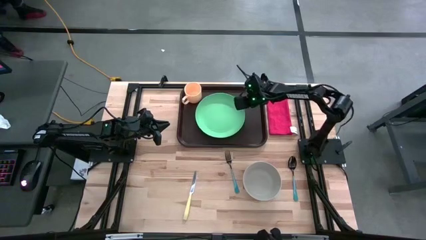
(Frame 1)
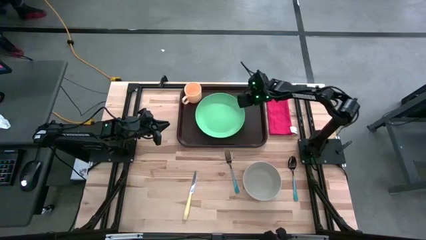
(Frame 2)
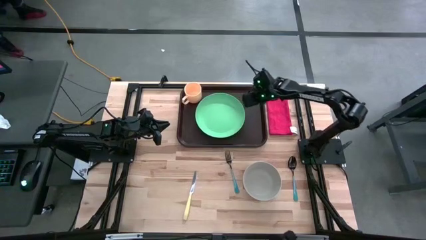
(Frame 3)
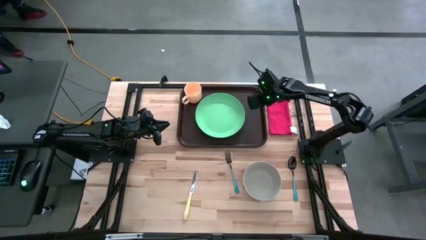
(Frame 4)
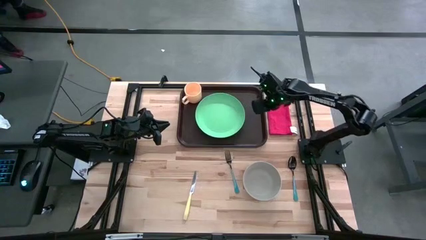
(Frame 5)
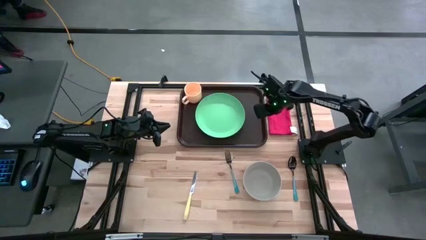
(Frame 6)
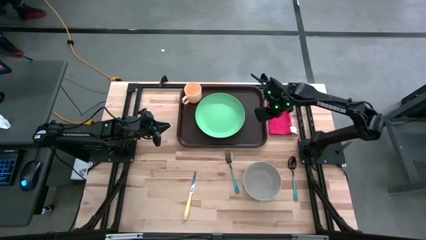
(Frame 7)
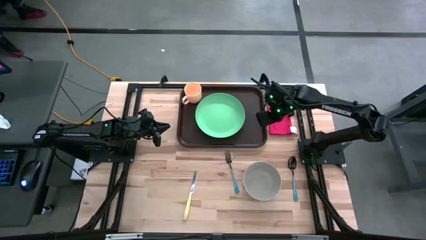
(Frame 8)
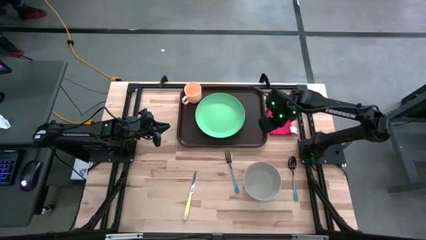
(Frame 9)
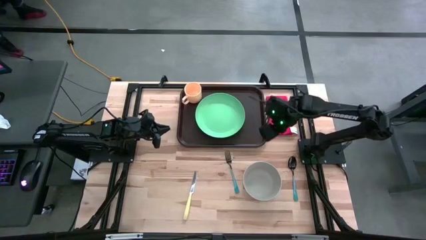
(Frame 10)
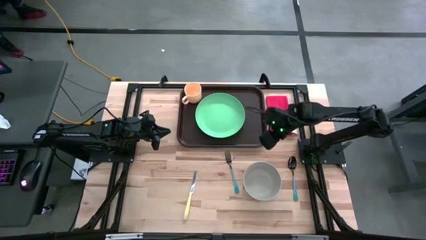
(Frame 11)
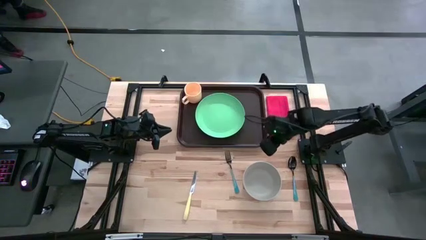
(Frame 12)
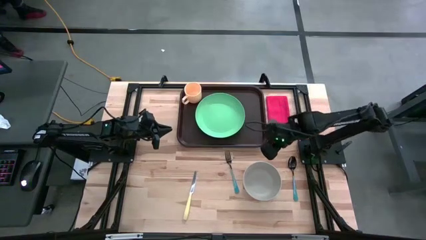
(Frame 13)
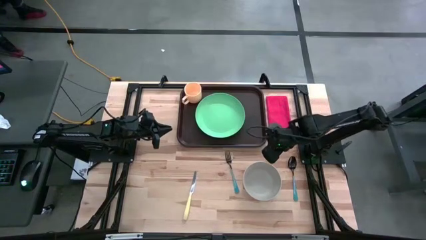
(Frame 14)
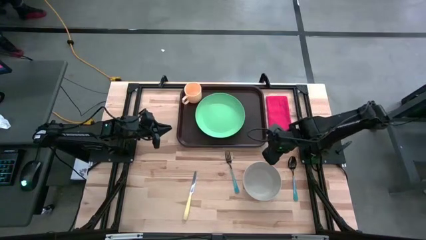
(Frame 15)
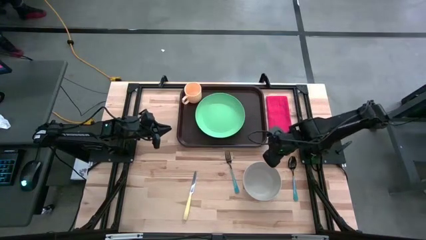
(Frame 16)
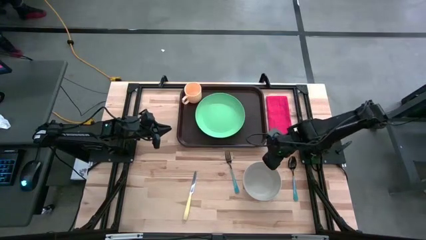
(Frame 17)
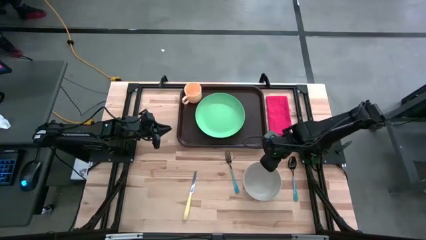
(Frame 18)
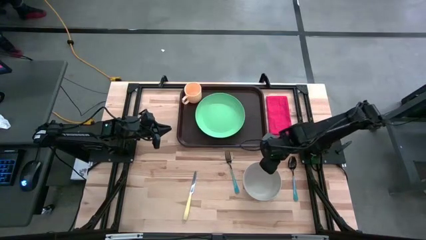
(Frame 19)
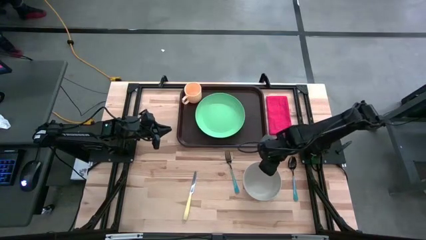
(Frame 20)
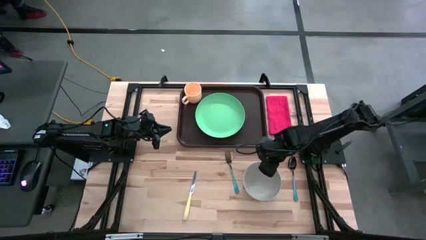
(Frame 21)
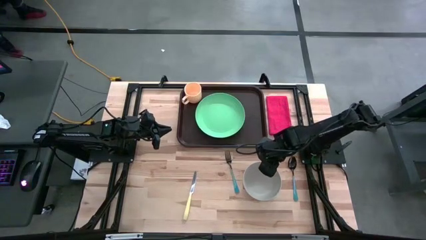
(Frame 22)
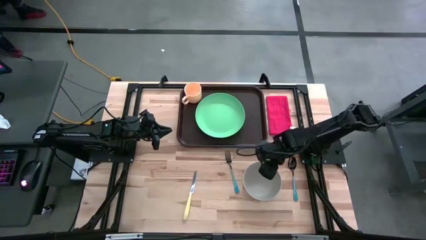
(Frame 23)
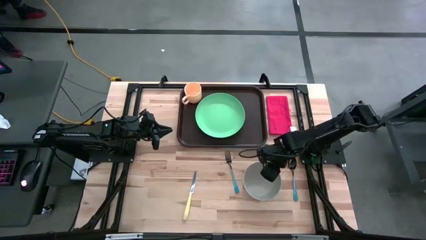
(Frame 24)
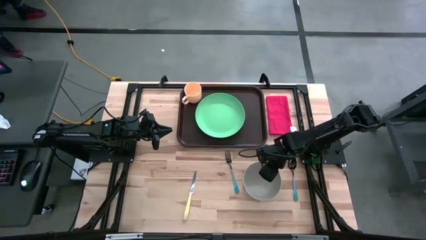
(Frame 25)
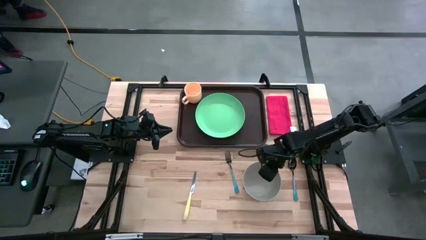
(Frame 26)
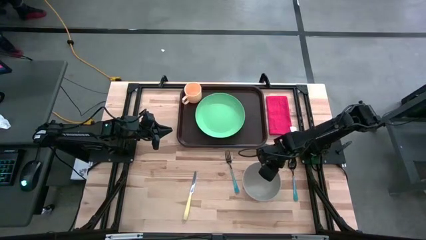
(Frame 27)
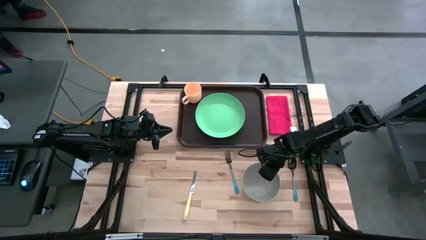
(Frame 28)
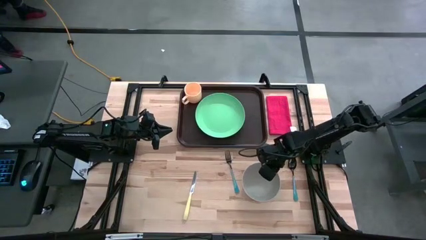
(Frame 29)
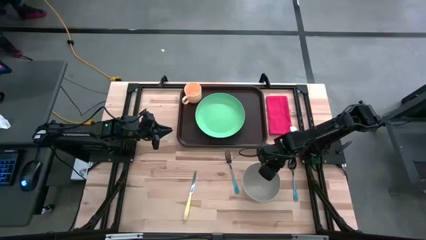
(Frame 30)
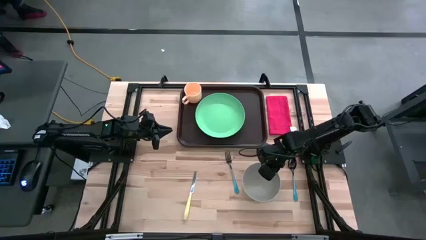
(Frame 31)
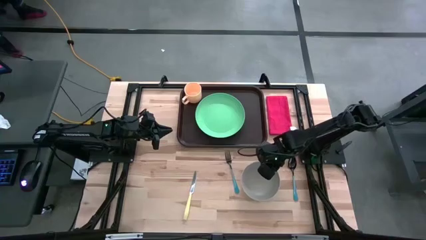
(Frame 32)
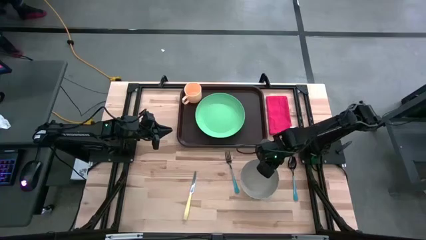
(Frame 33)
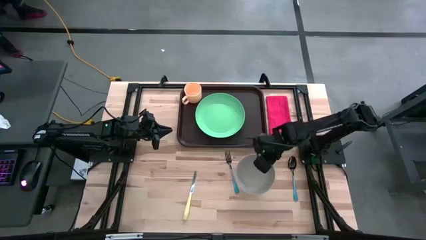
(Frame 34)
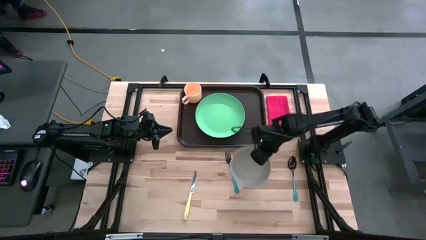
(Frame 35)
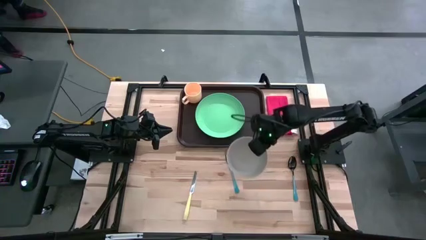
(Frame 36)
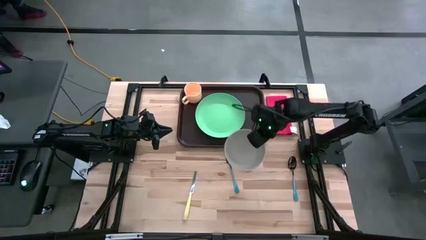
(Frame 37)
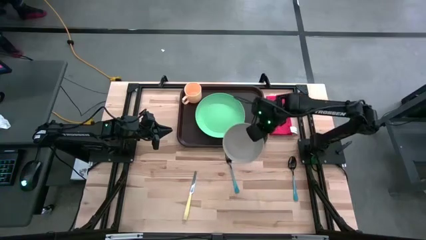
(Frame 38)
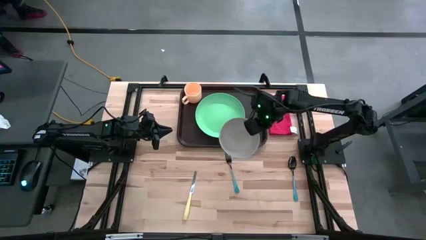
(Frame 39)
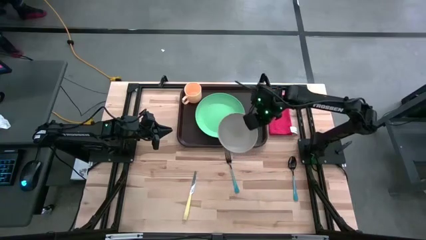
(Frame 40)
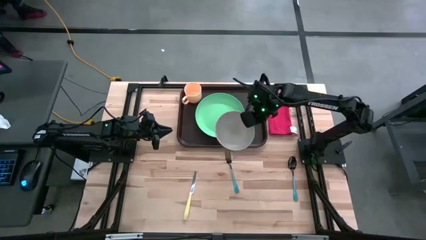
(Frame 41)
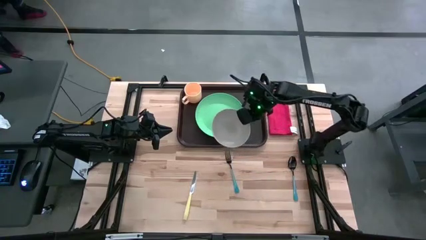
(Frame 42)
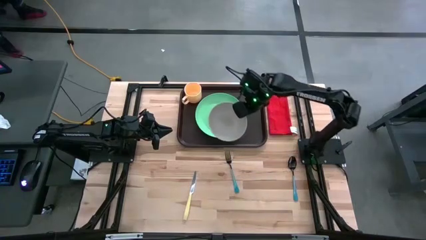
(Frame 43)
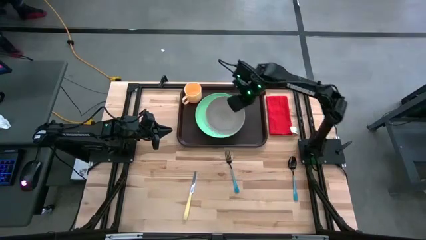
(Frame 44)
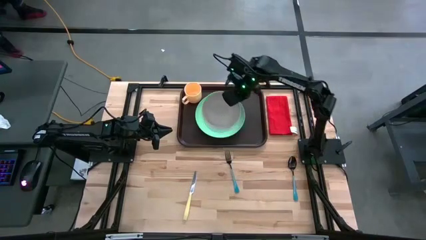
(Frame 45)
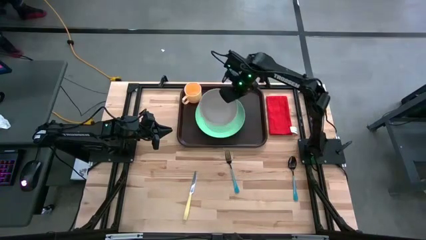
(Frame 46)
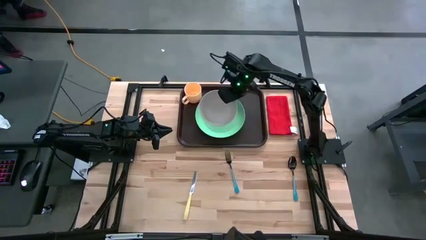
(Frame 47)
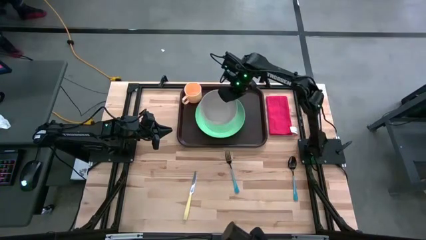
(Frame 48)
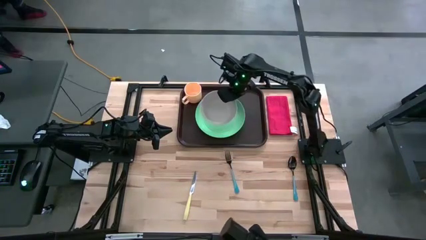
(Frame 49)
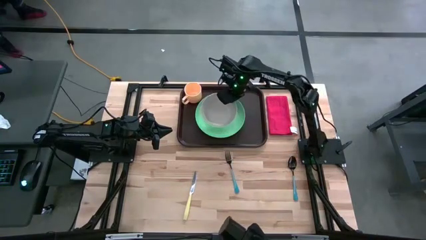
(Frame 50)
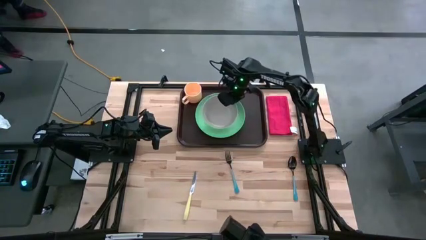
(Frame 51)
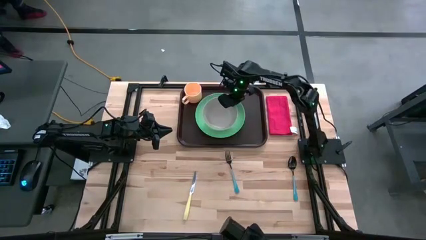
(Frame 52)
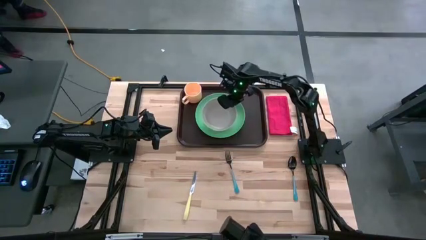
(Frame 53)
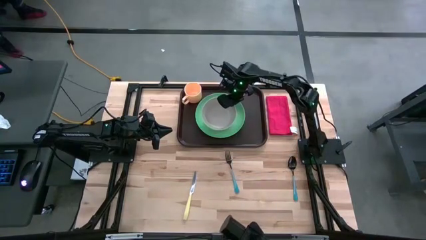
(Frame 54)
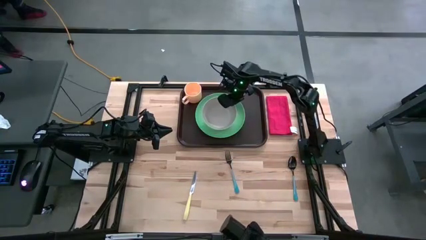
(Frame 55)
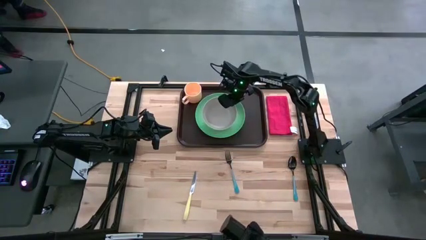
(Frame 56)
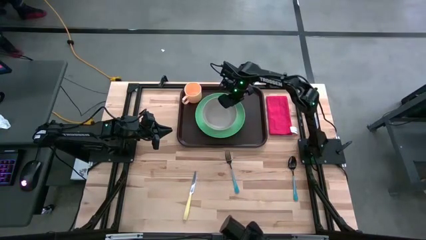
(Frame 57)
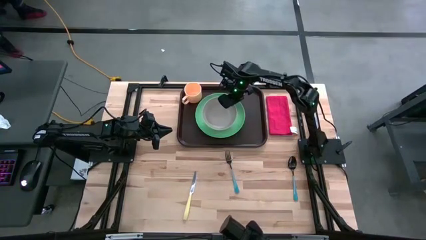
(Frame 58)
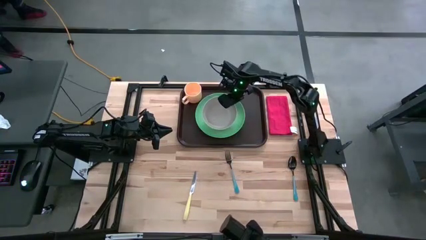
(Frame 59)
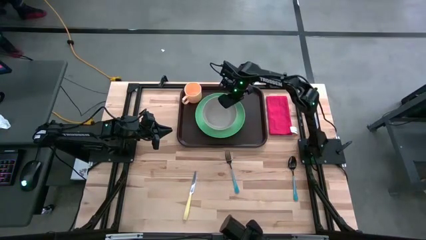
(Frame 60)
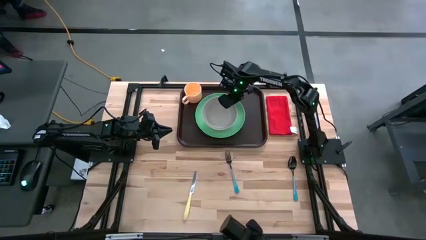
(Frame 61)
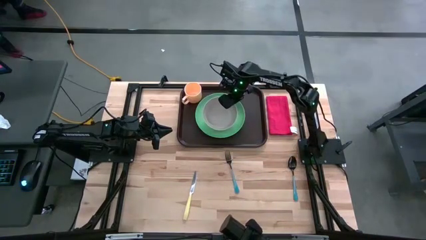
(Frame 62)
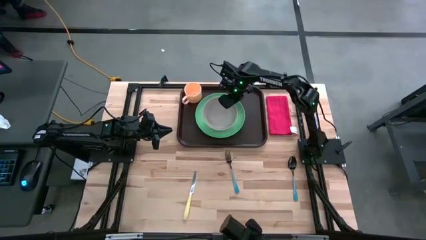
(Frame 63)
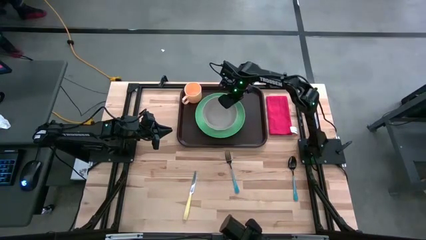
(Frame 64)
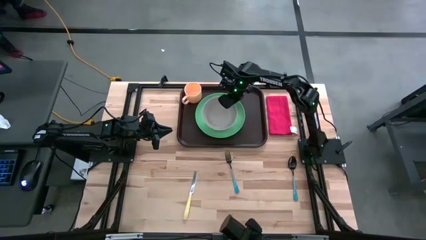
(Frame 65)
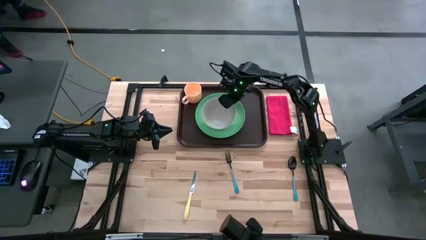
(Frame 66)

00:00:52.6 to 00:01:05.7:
Task: Set up tray
Put the gray bowl on top of the green plate on the brown serving tray
